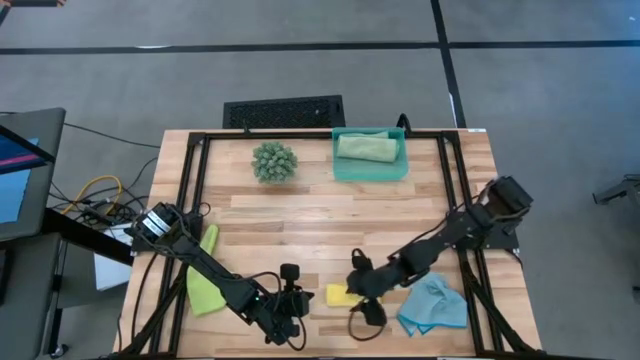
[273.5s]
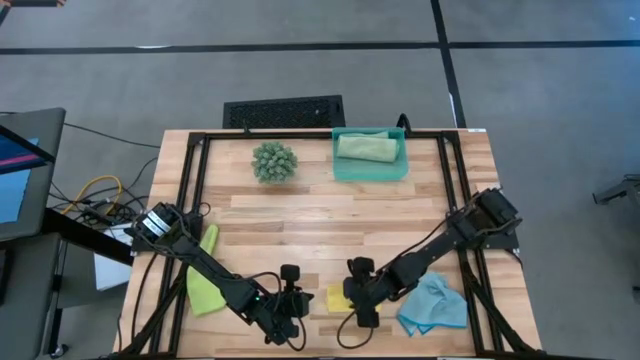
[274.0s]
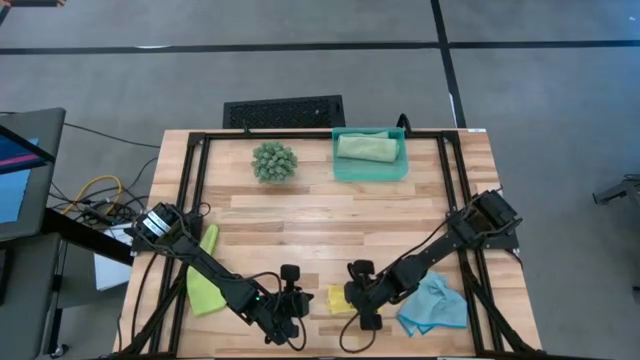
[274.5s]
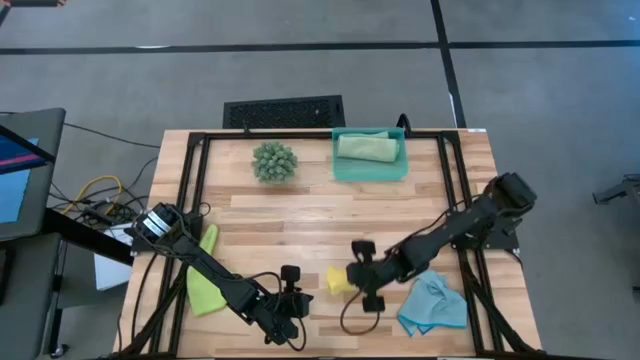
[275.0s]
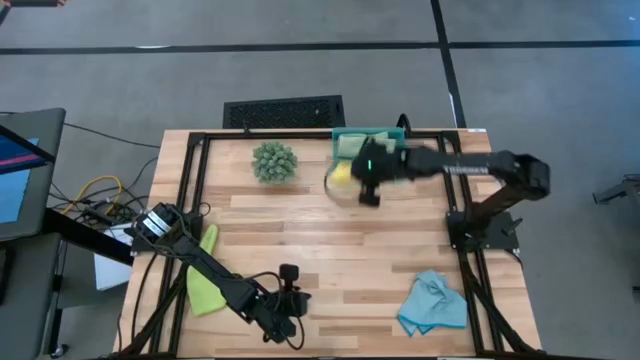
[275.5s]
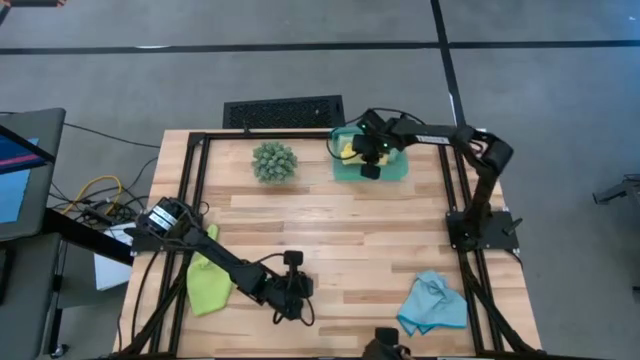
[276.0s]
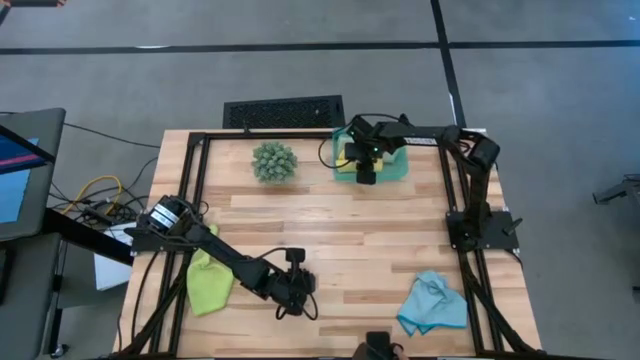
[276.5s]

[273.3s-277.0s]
Task: Roll microfiber towels into tight, uniform cylinder then place into a basket
Put the yellow microfiber cloth into the green organizer bin

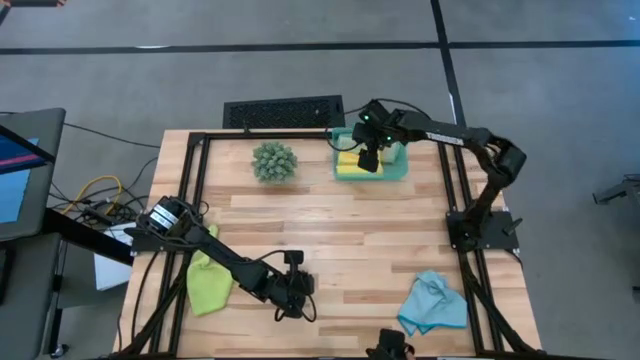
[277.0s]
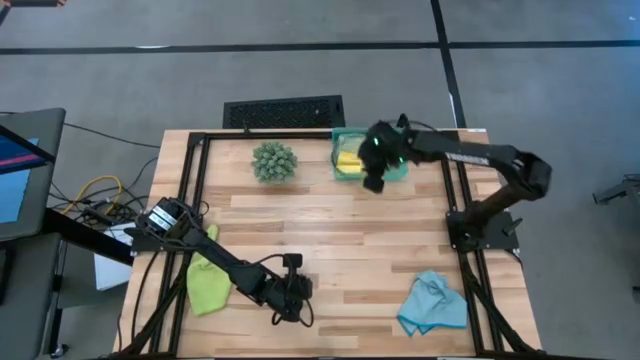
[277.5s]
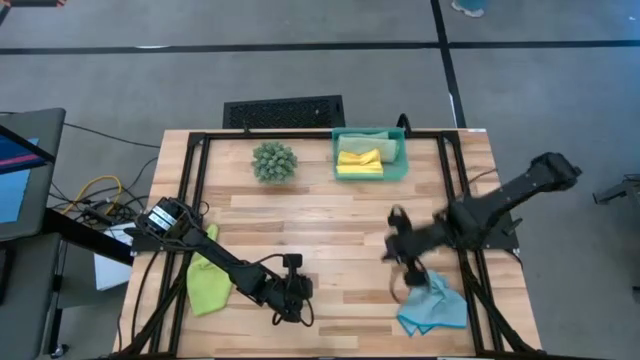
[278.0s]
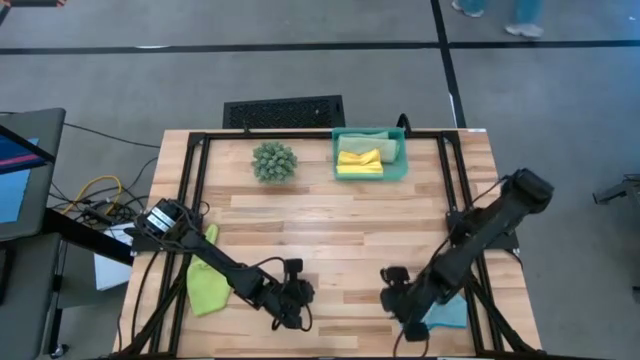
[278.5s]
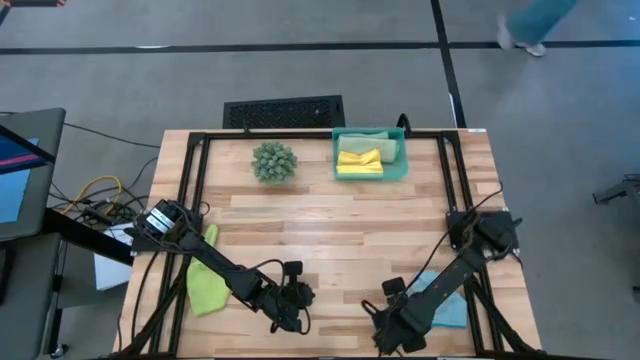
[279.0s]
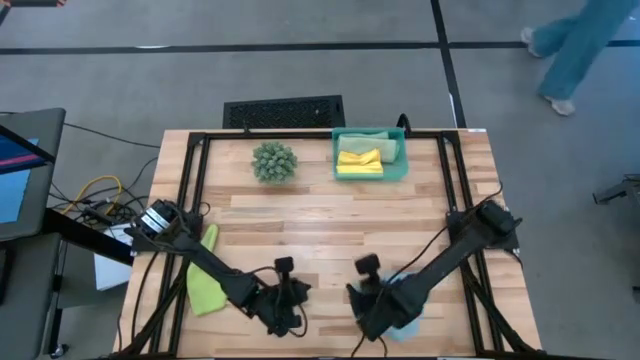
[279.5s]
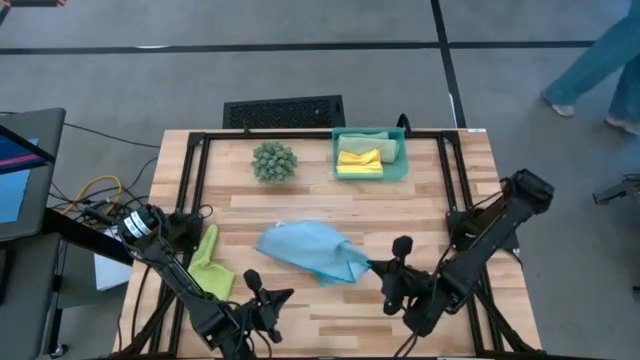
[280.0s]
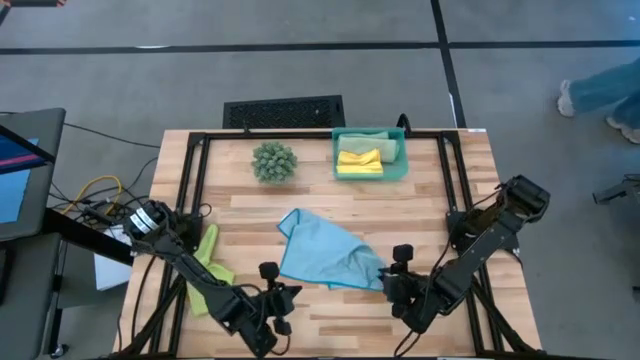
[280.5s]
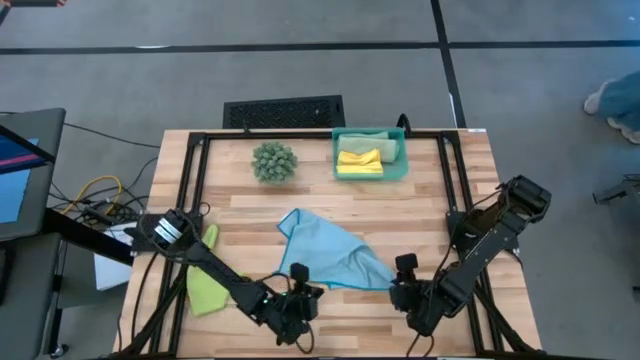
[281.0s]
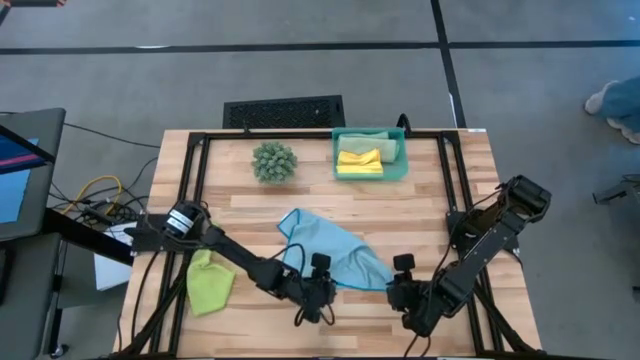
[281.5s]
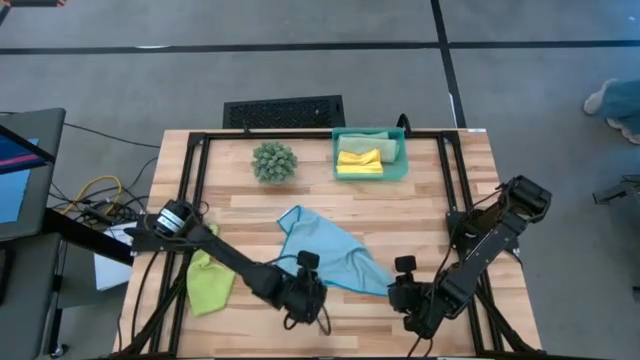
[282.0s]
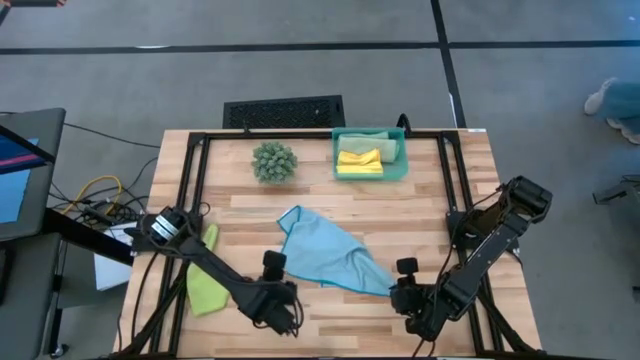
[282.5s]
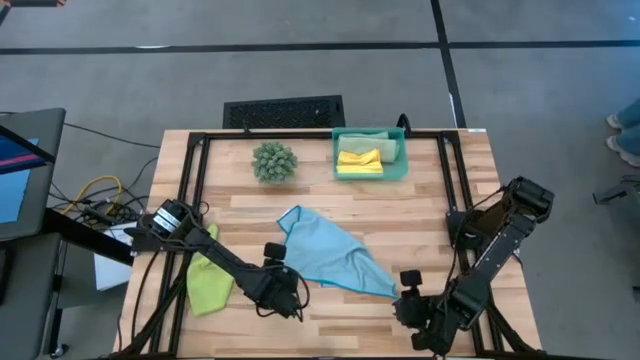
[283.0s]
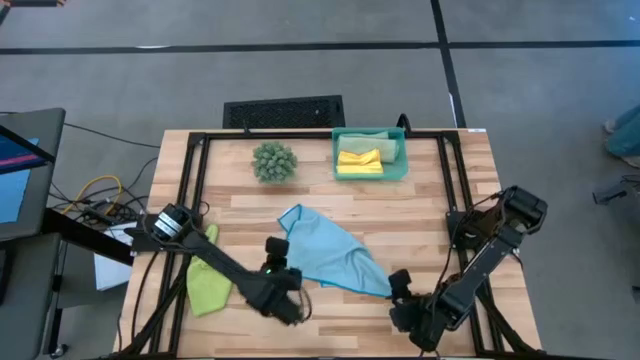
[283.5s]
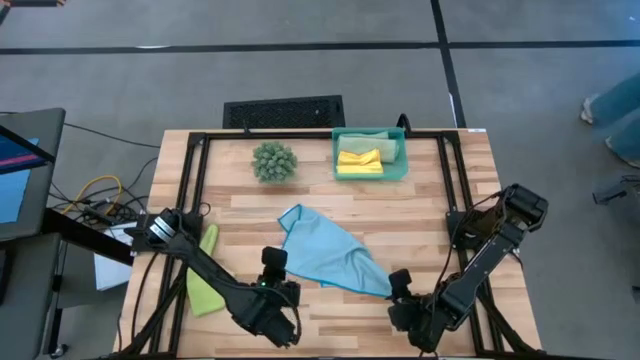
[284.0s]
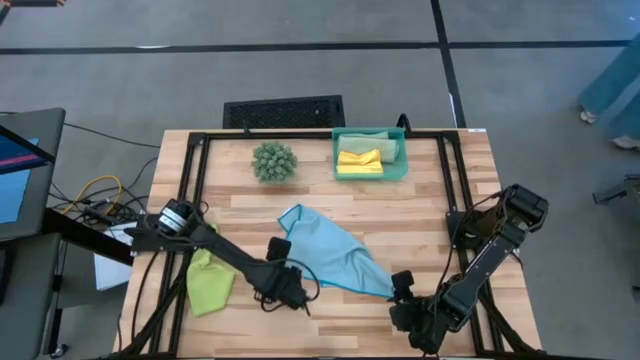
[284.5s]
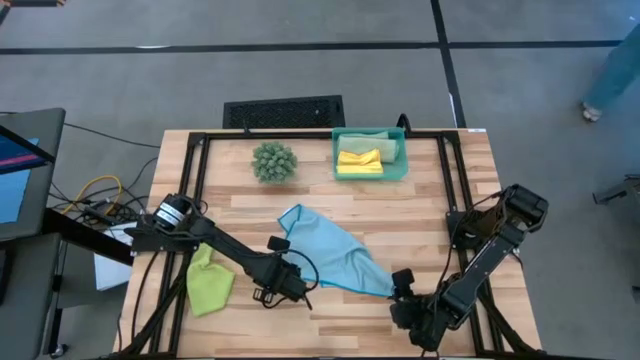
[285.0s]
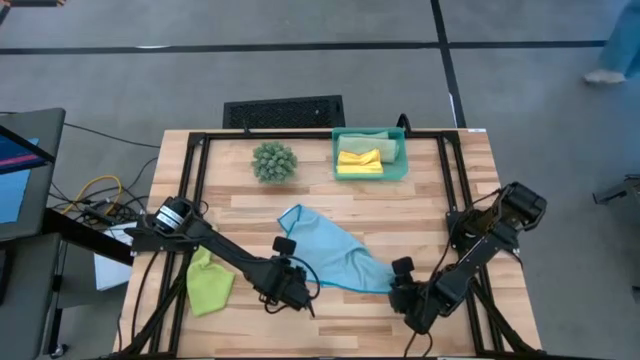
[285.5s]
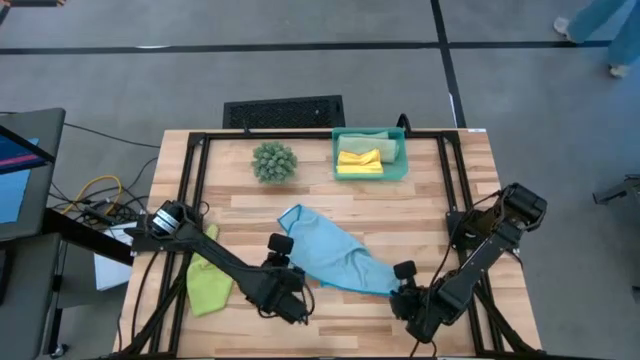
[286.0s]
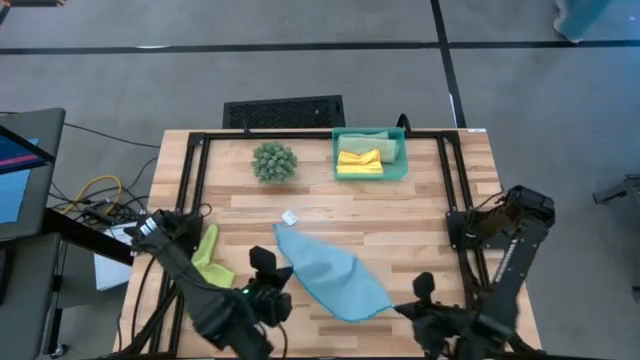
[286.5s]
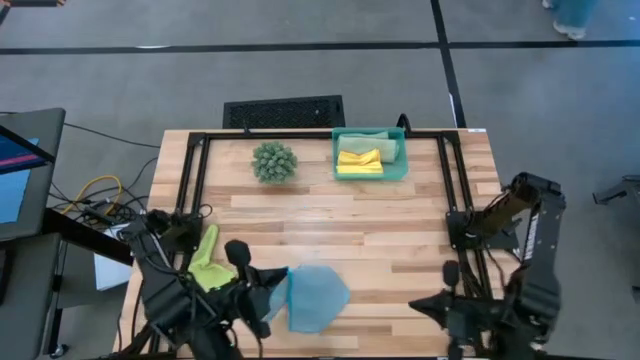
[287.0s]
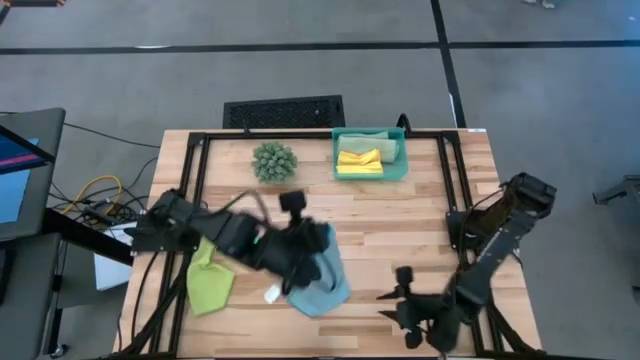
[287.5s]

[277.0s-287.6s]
Roll the blue microfiber cloth

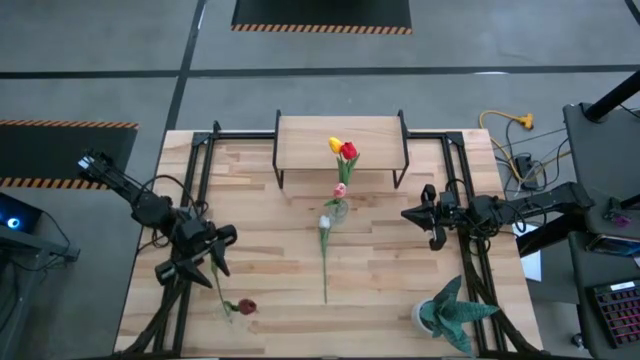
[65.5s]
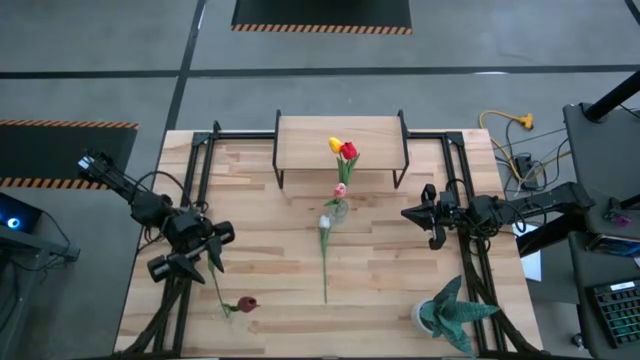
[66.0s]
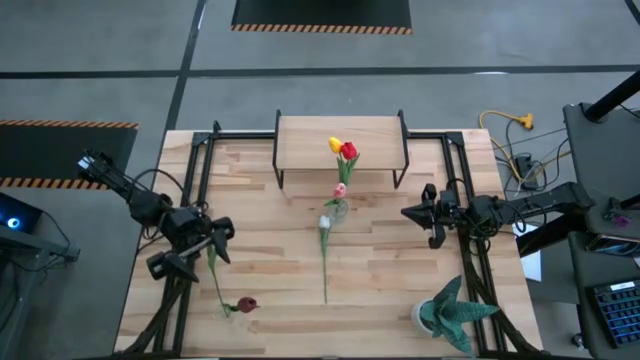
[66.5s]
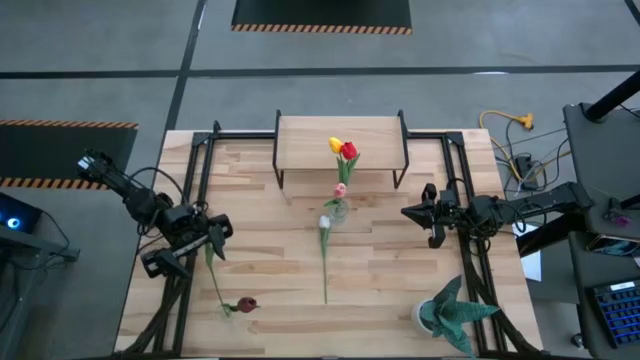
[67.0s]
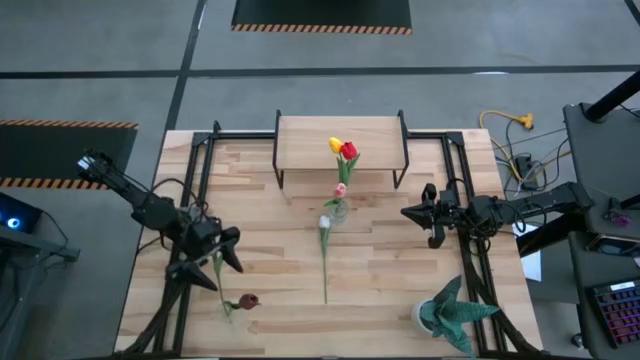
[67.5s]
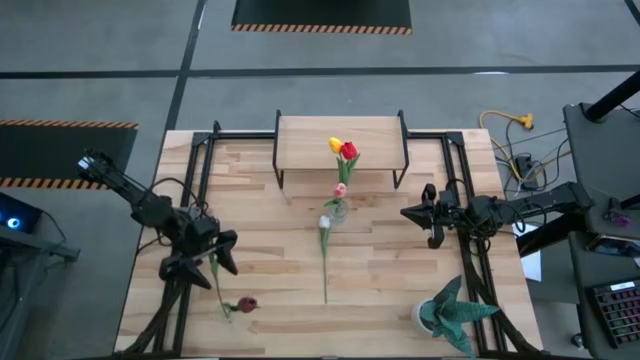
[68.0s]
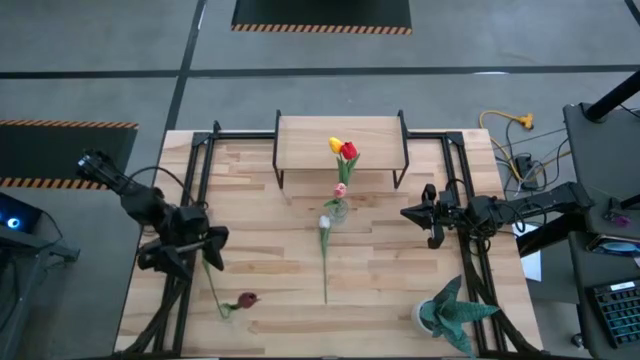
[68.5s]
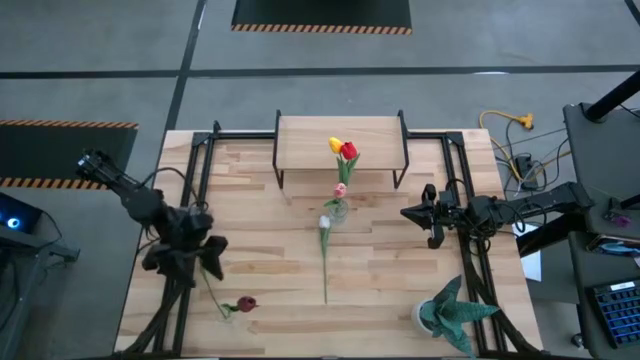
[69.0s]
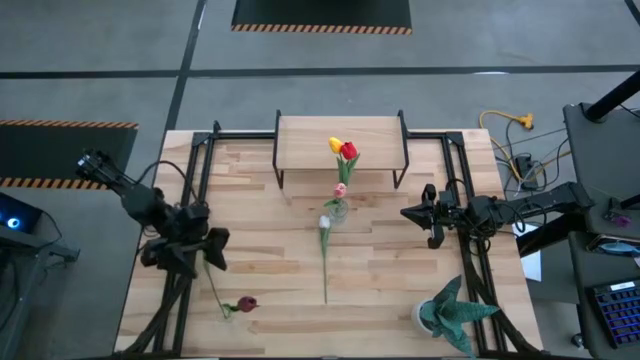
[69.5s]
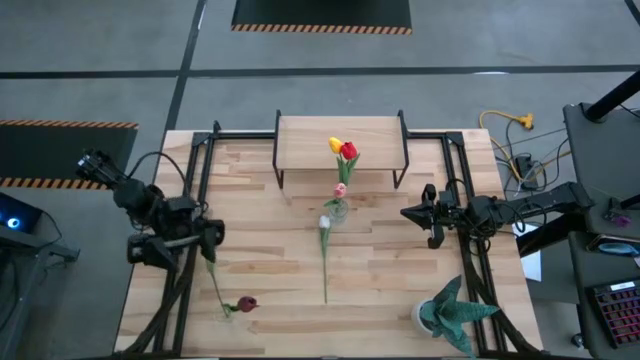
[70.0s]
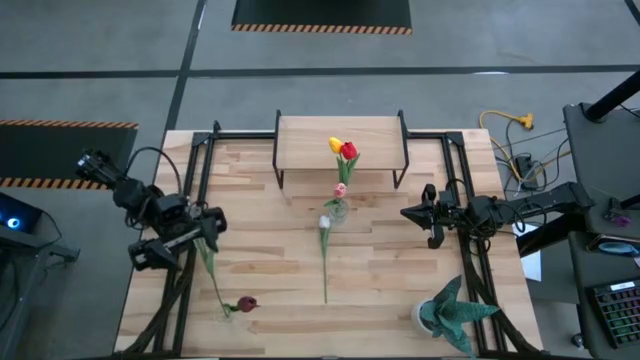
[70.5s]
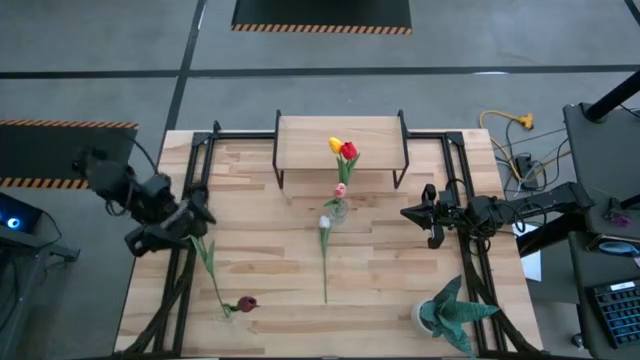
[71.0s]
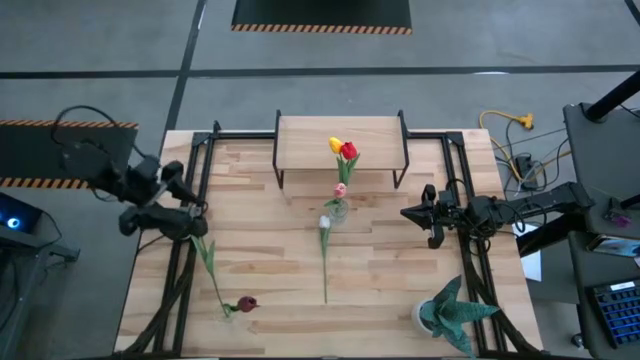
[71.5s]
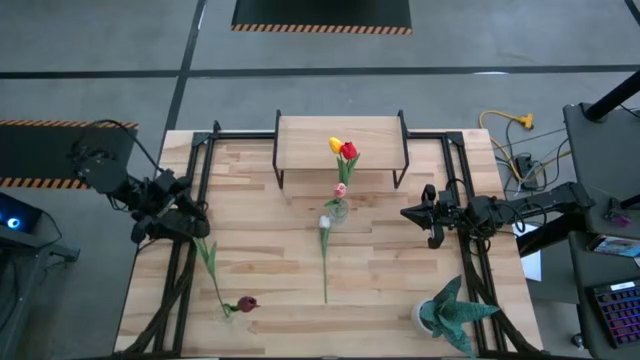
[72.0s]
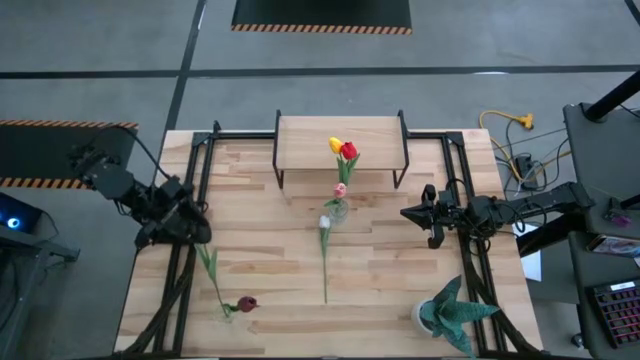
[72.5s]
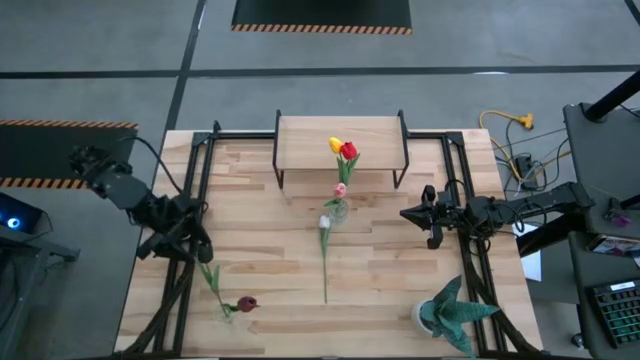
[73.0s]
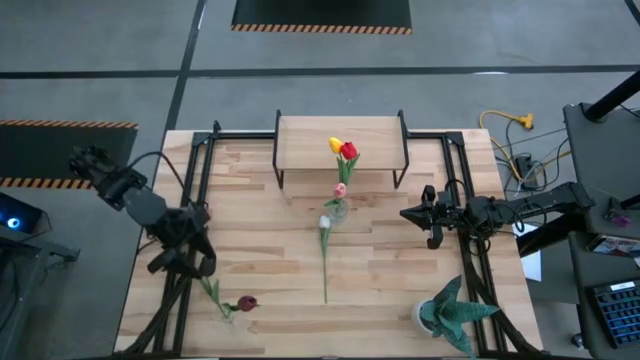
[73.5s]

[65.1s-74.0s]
Task: Pick and place flowers into a vace then onto a shelf
Put the white tulip into the top transparent vase
